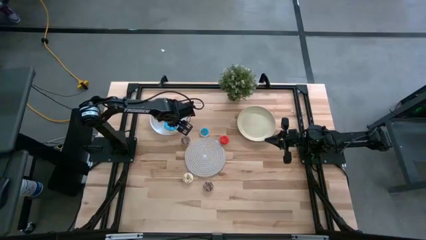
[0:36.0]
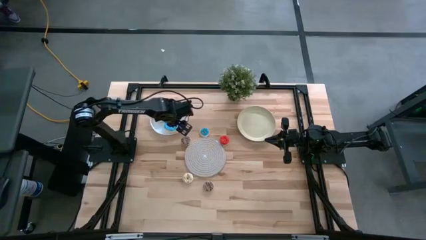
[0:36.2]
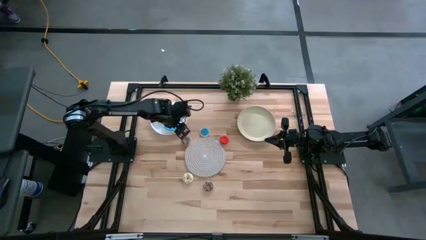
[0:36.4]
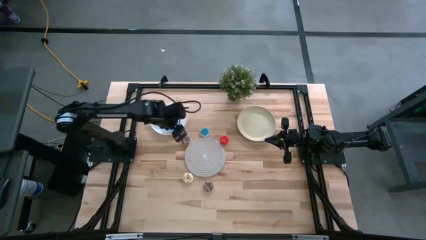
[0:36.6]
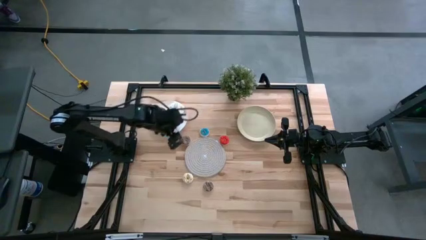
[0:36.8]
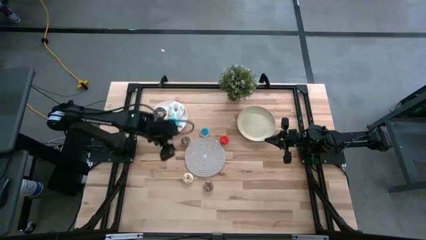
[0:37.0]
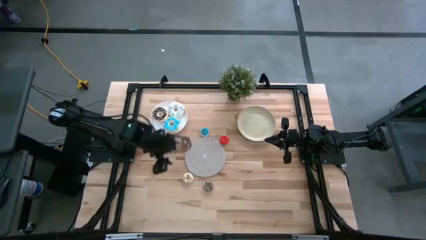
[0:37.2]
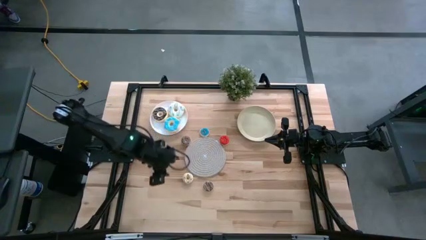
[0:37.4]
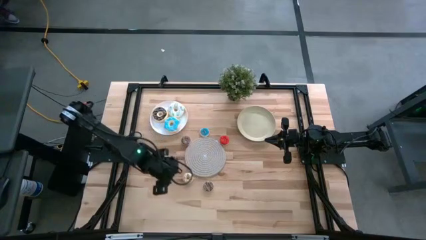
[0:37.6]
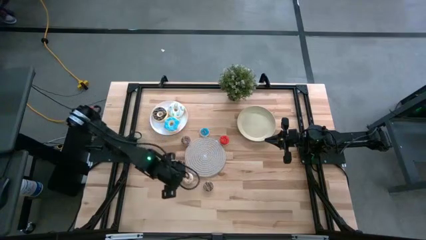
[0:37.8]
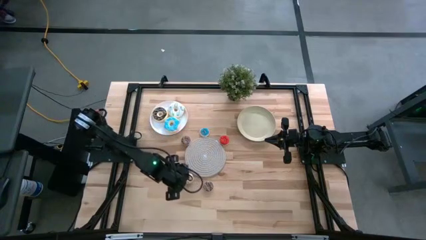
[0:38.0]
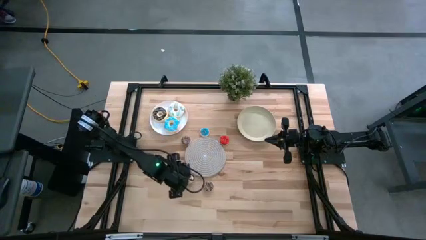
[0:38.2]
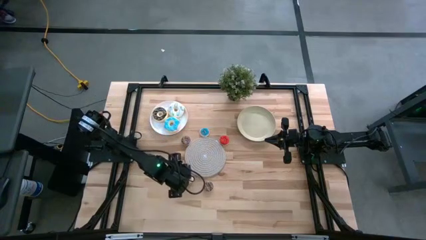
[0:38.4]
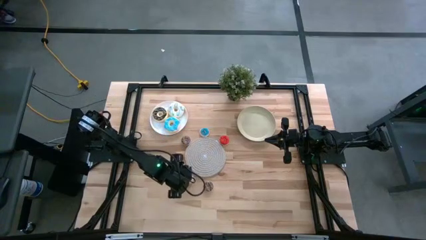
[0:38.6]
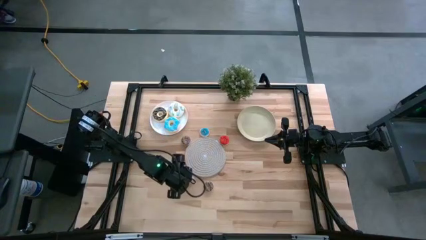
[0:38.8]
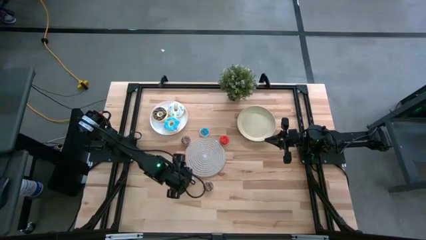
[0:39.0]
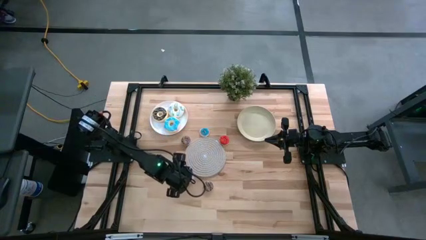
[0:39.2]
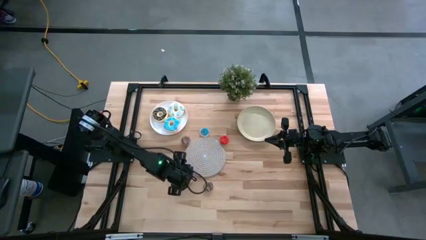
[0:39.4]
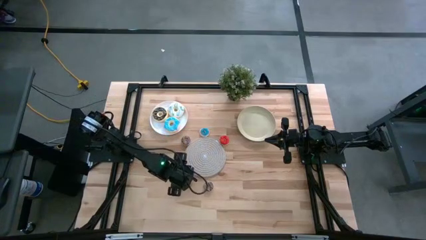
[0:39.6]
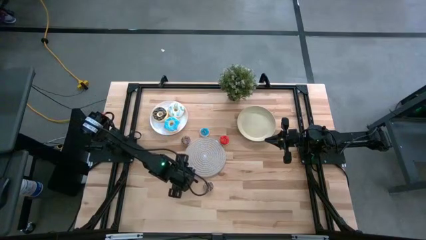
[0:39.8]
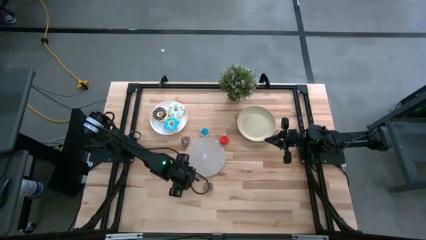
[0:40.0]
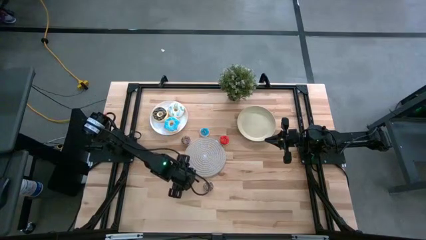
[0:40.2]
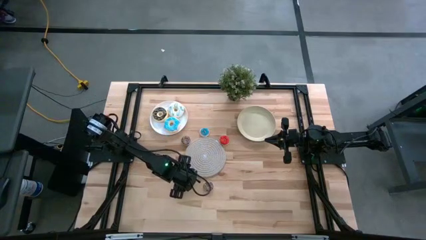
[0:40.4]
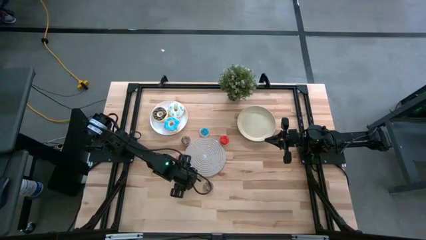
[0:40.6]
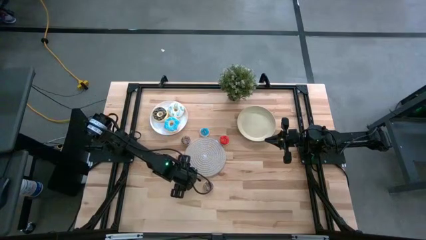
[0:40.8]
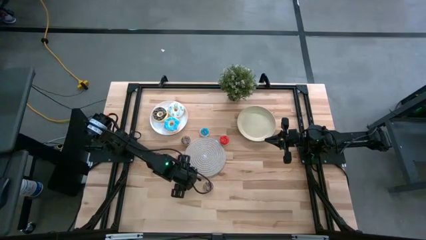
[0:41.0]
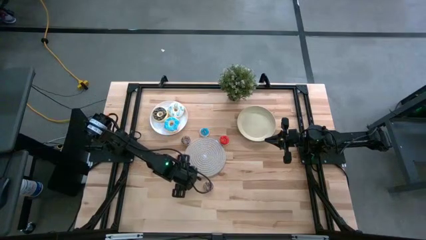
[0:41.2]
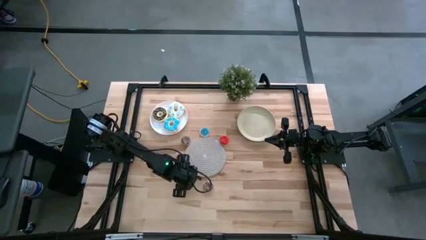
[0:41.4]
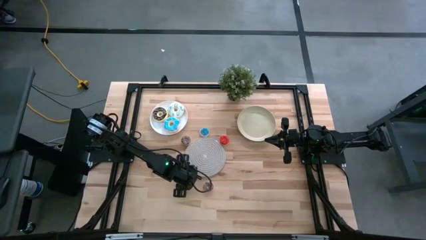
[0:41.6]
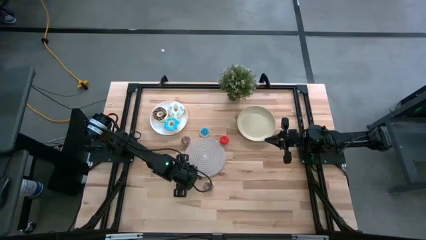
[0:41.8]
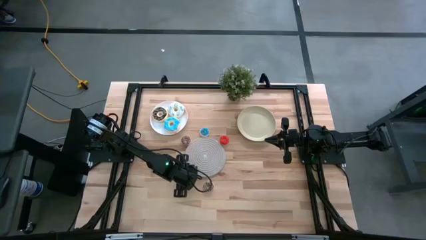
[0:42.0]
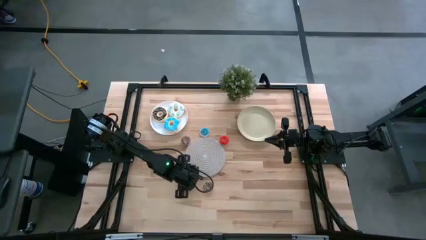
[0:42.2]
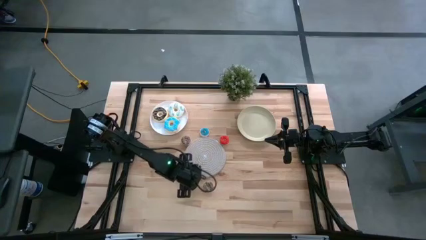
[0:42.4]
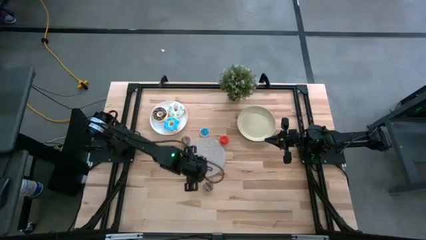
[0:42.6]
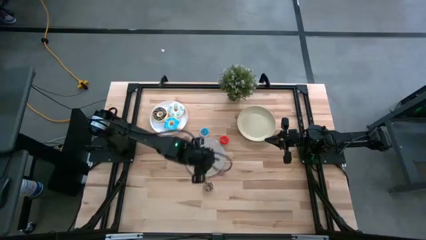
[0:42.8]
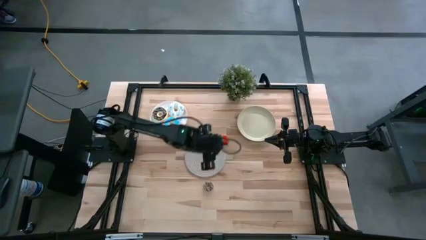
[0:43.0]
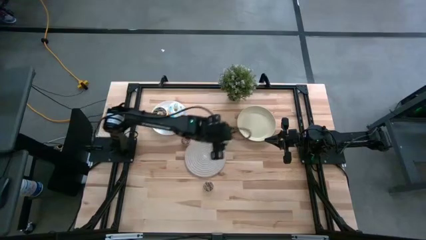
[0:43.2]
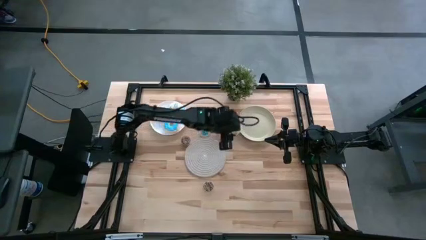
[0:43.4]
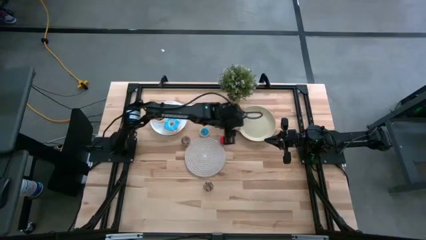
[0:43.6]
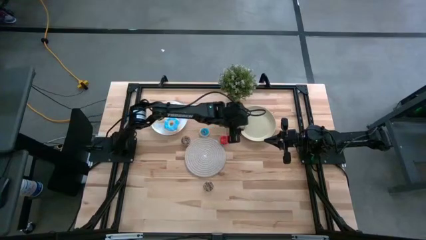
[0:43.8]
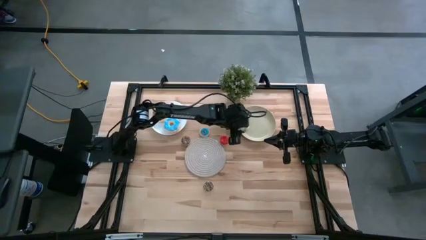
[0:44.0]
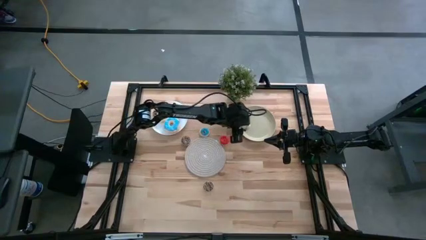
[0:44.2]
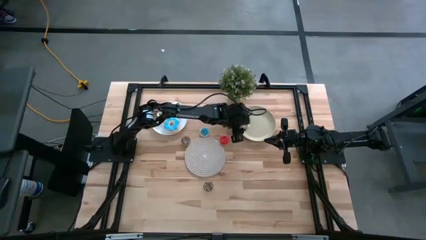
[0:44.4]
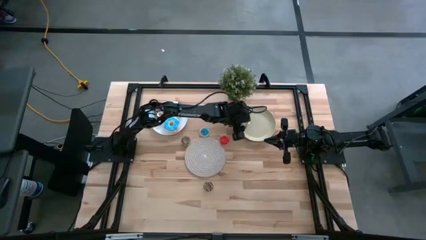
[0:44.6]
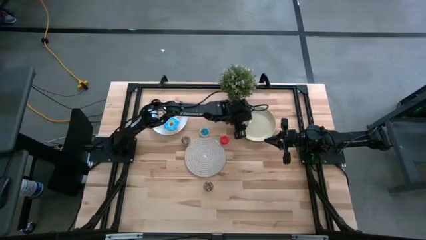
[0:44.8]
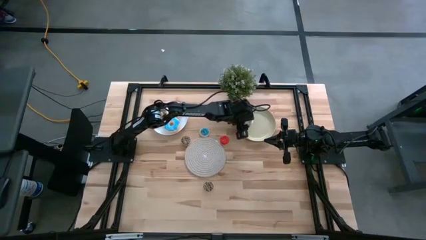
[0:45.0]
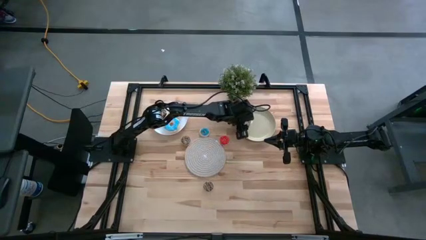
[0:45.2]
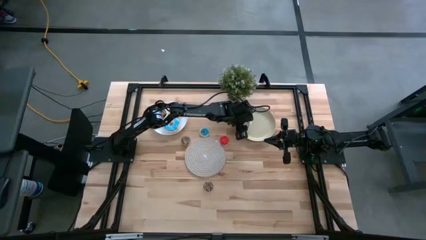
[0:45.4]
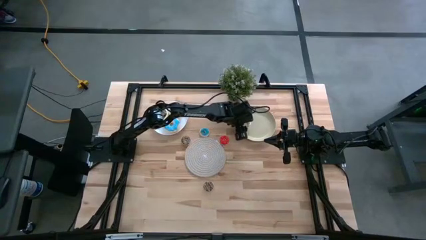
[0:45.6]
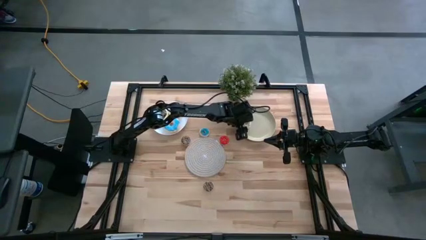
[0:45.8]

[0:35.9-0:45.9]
Task: Pick & Place donuts
Put the small white donut on the brown plate

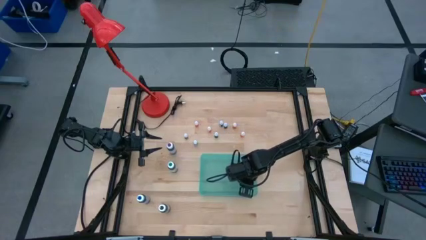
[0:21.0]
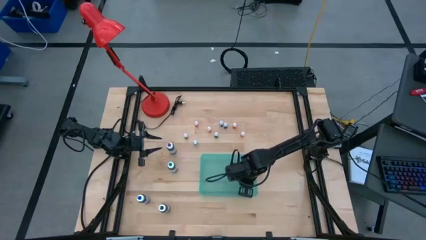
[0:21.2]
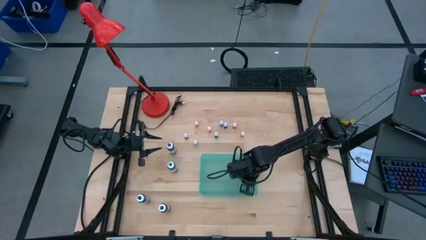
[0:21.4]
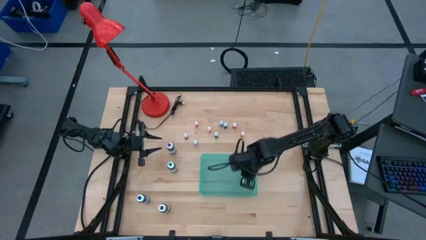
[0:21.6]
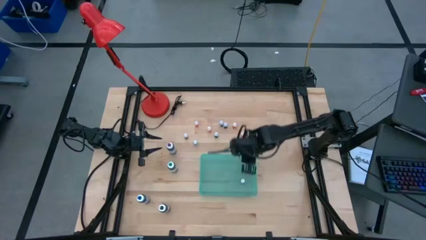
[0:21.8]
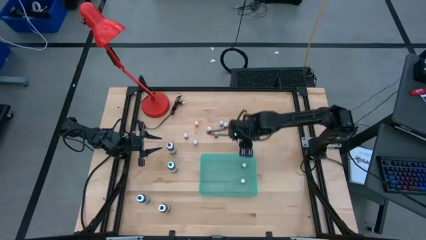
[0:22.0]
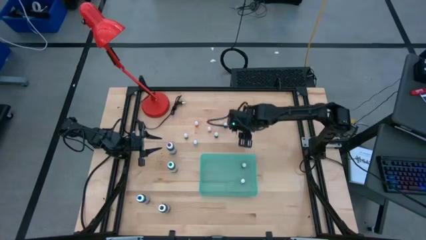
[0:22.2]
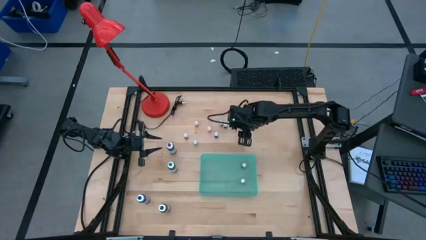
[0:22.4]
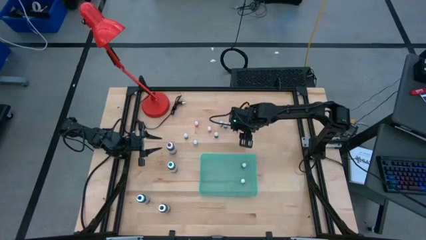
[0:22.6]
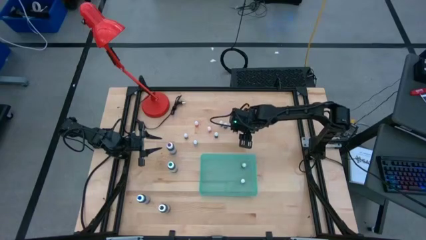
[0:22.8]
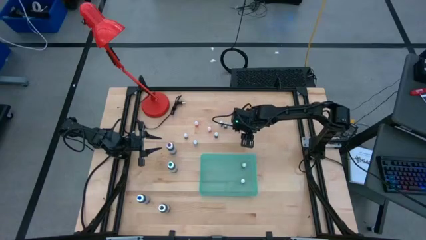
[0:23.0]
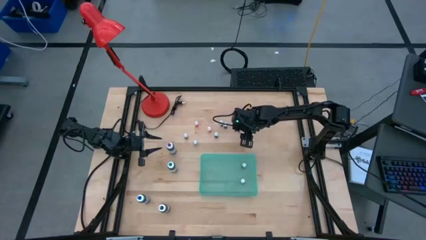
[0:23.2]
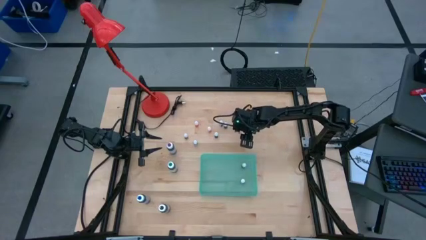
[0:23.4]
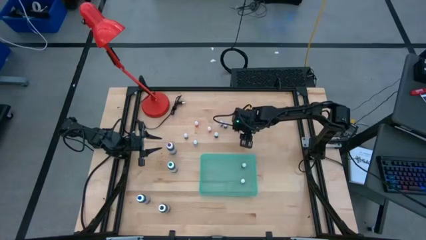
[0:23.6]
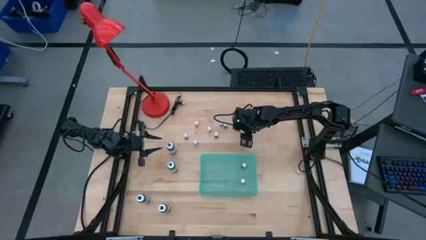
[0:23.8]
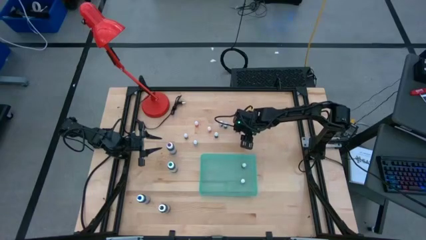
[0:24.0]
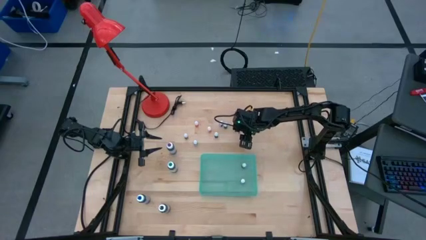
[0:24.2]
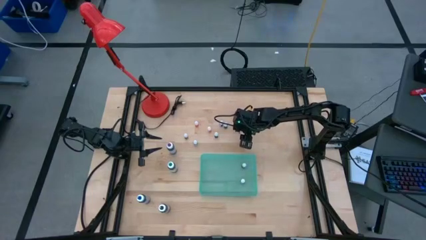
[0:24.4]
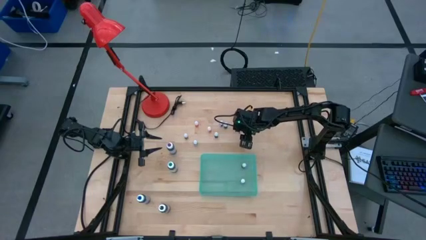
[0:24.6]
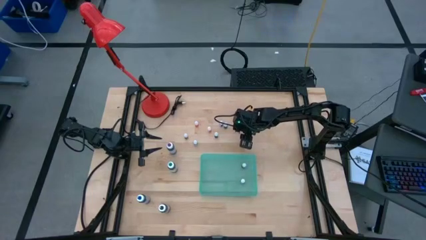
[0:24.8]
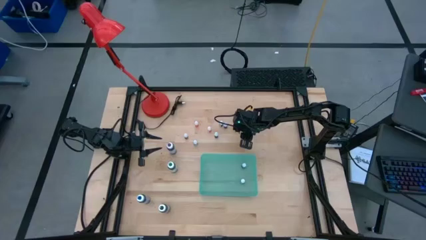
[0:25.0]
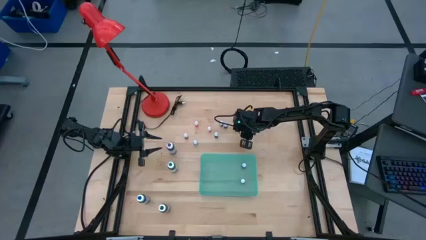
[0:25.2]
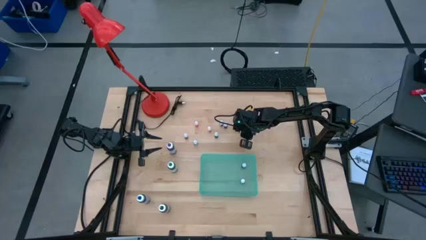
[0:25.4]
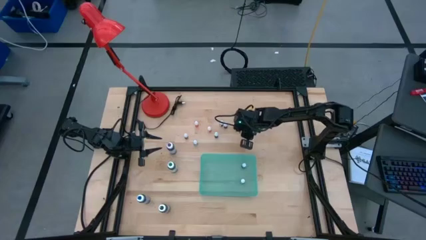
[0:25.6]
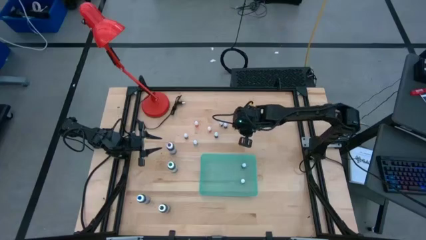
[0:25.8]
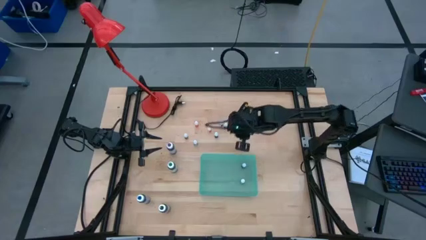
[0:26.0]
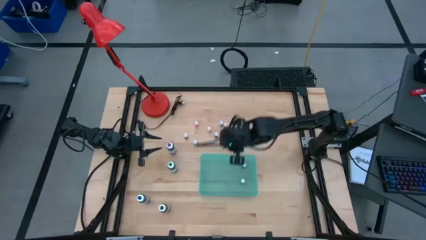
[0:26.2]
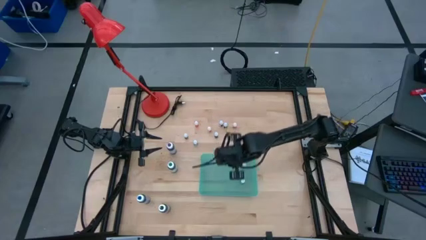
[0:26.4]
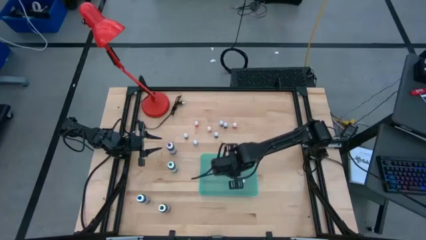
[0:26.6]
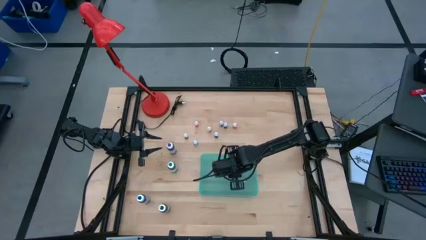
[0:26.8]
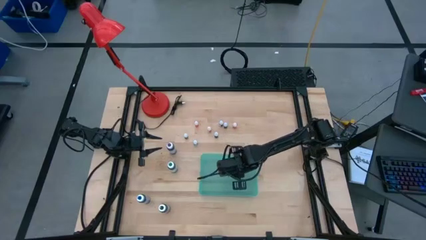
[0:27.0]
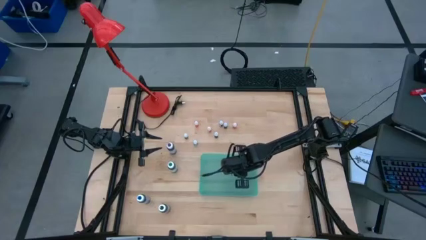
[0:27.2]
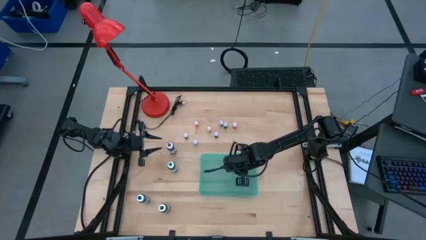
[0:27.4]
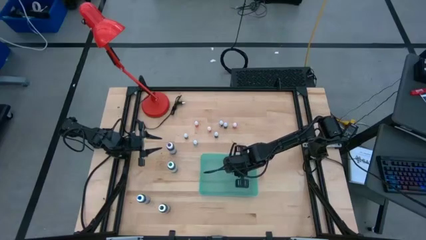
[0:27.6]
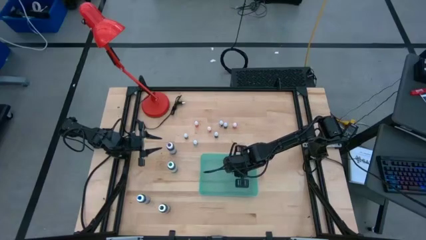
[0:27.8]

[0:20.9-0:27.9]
Task: Pick & Place food coloring
Put the small orange food coloring bottle into the green bin
